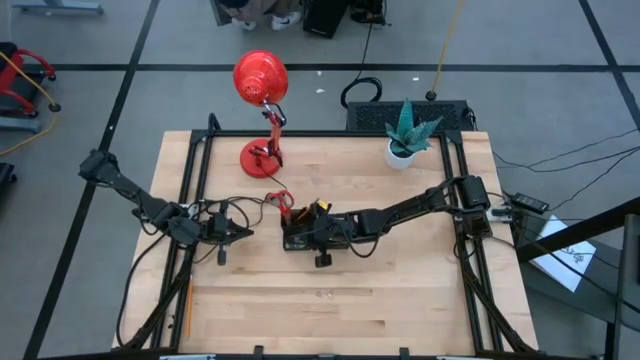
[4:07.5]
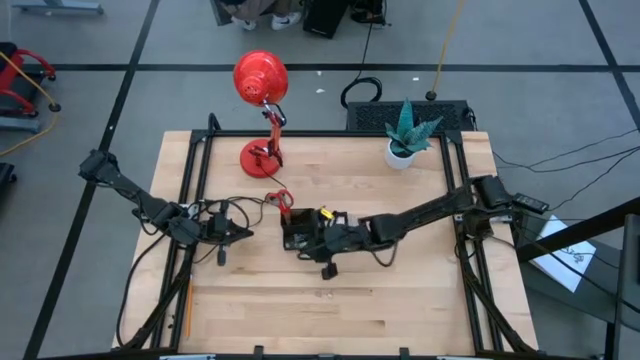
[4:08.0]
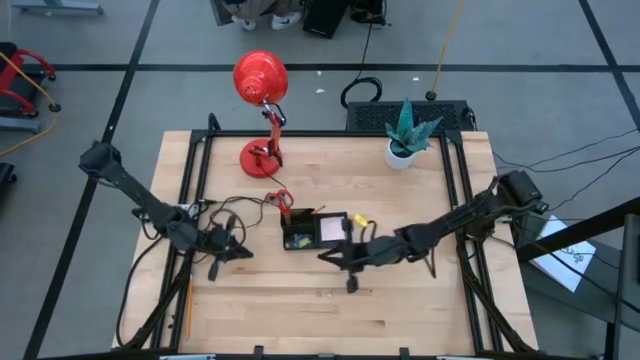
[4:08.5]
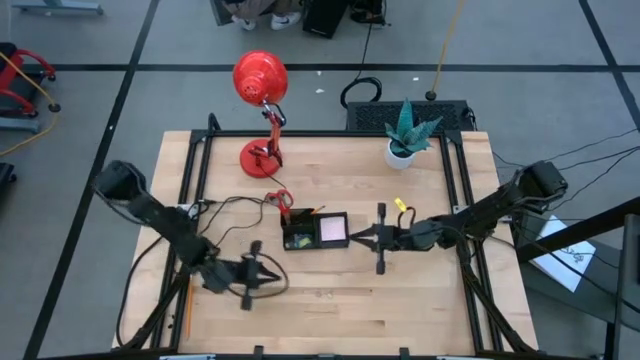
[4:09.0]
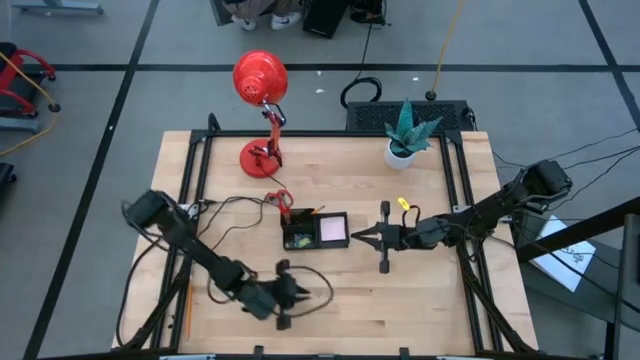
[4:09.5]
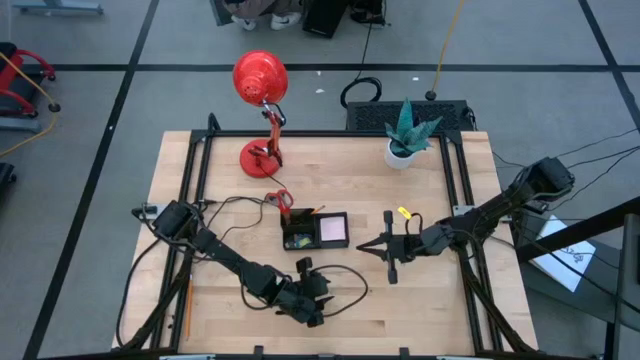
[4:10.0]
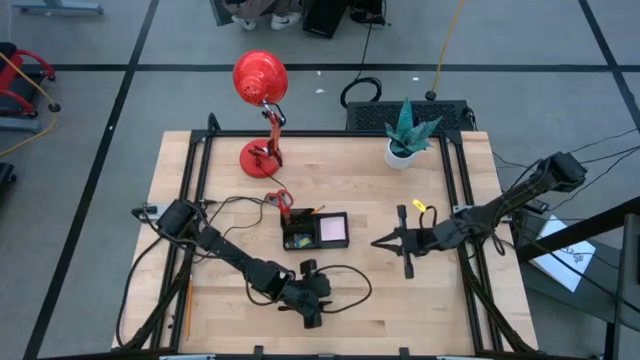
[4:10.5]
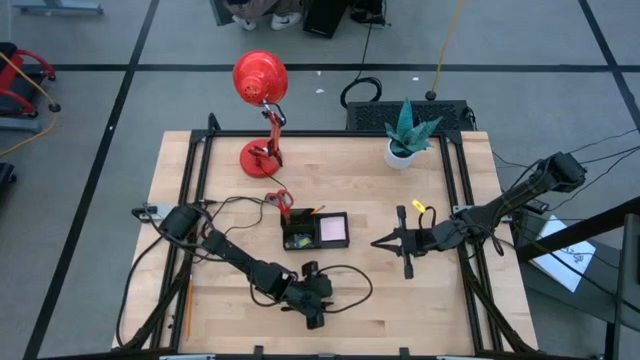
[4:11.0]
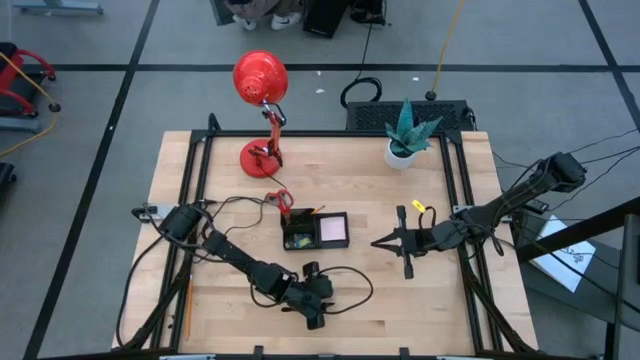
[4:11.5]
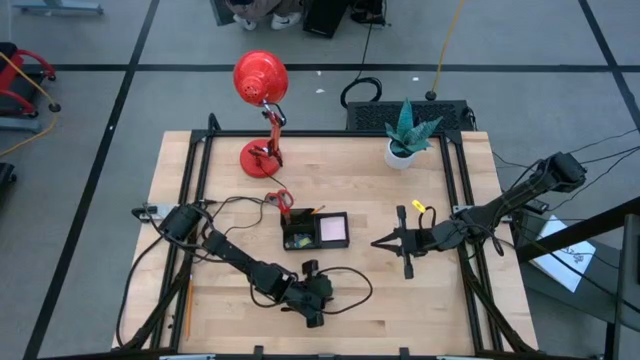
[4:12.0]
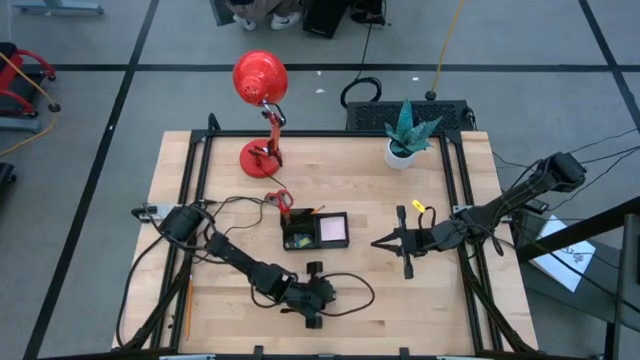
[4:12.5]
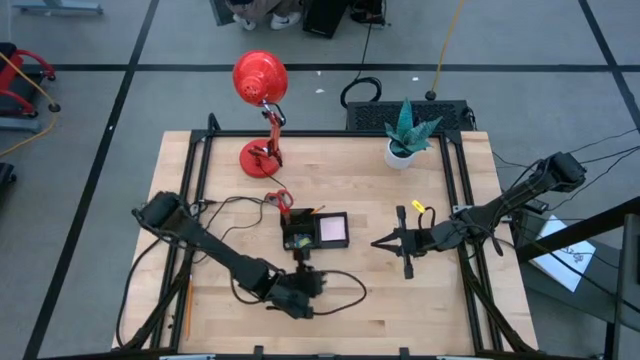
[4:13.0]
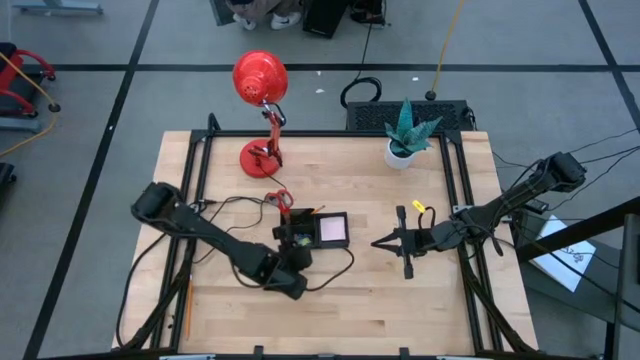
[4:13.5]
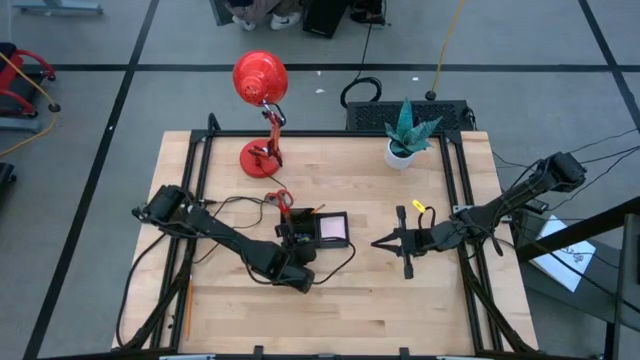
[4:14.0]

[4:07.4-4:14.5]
Task: Pick and place office supplies into organizer
Put the green binder clip into the black desk organizer

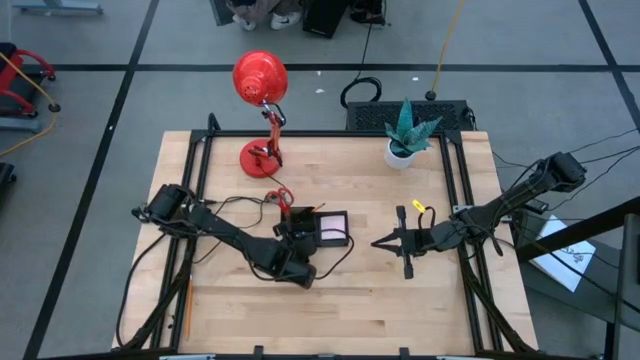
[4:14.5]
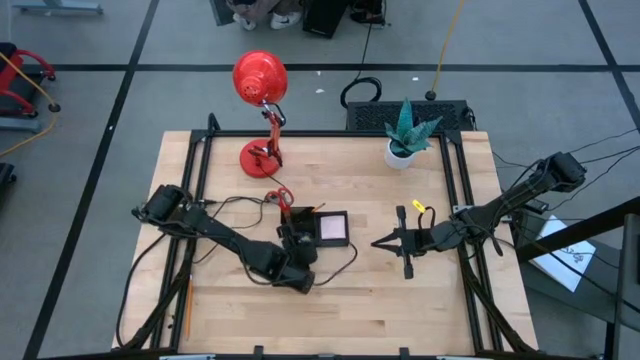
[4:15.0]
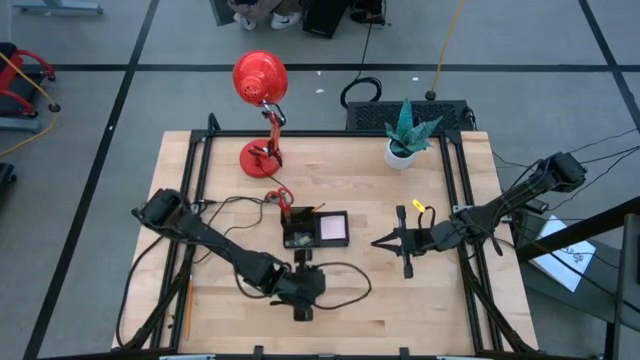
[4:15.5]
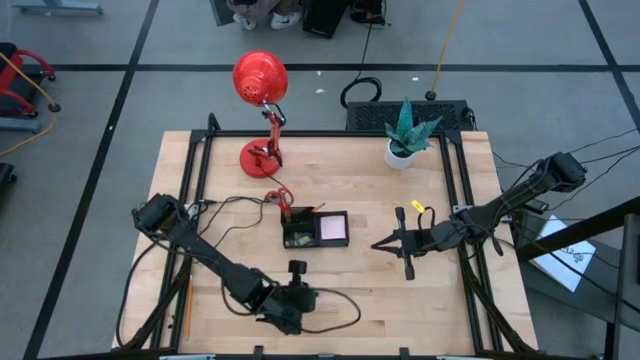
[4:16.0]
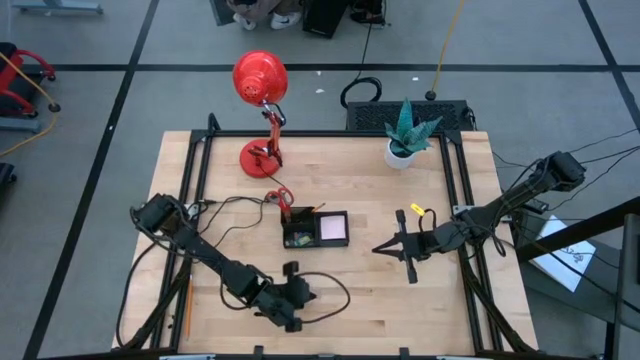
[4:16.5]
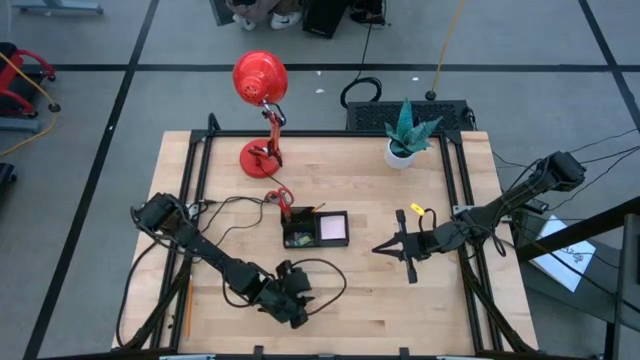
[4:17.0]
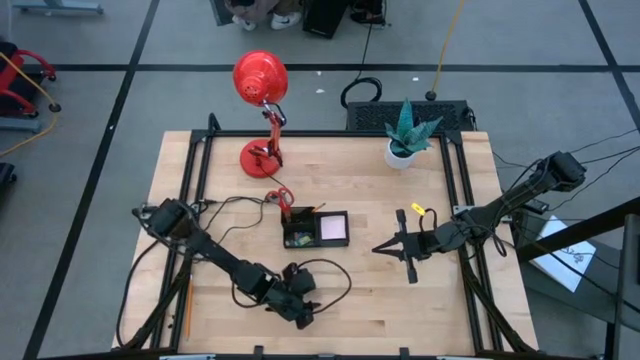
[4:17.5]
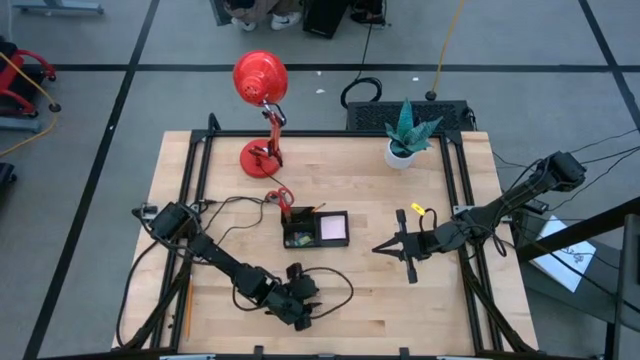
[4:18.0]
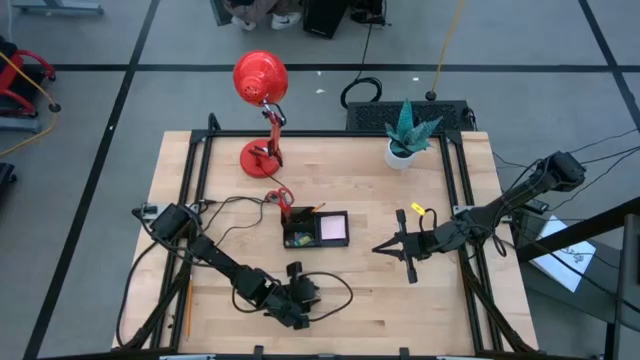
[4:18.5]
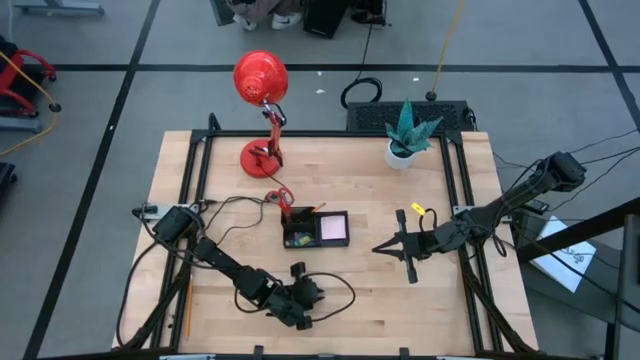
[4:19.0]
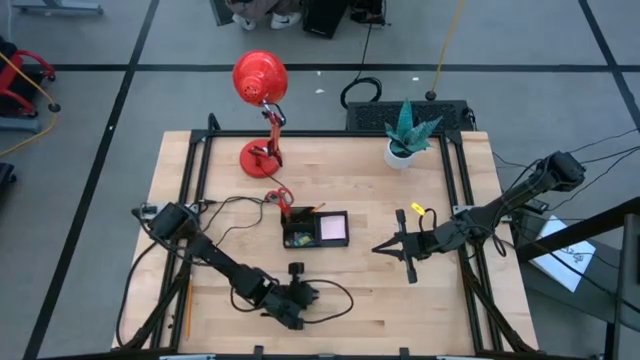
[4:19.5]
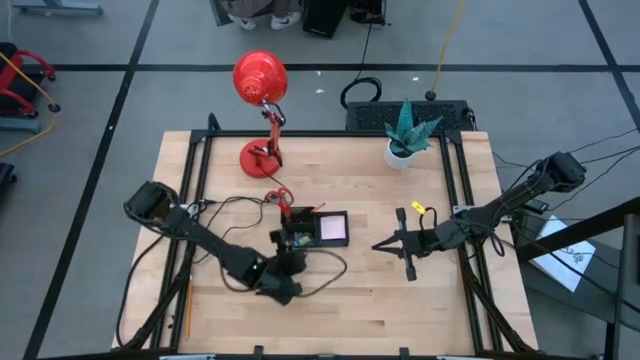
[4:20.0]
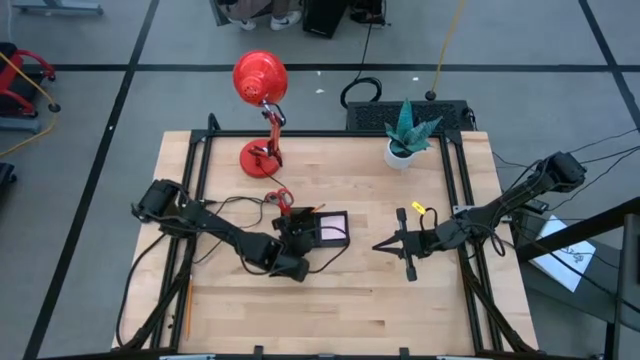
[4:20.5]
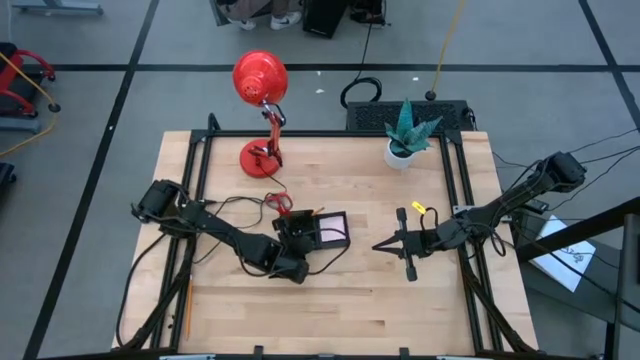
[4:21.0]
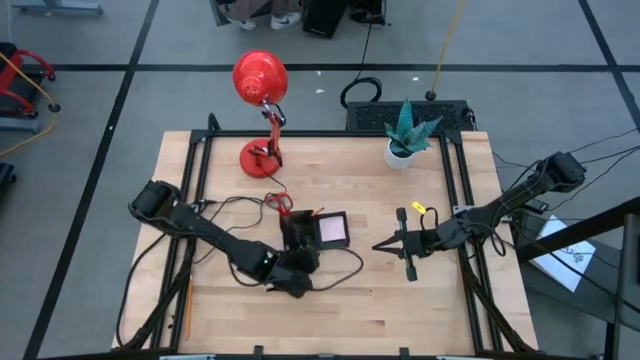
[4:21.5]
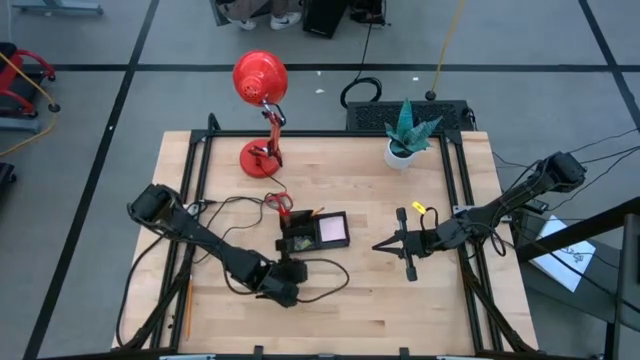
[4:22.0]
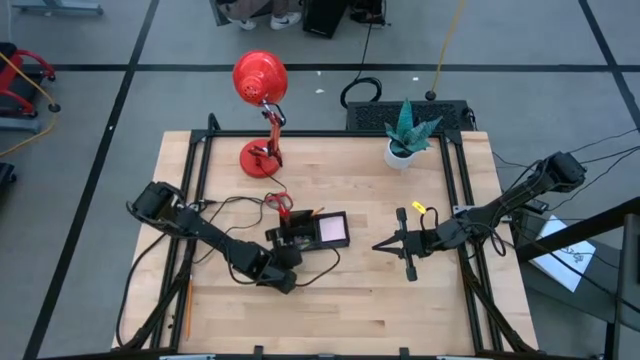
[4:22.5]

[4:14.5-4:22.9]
Put the pink binder clip into the black desk organizer

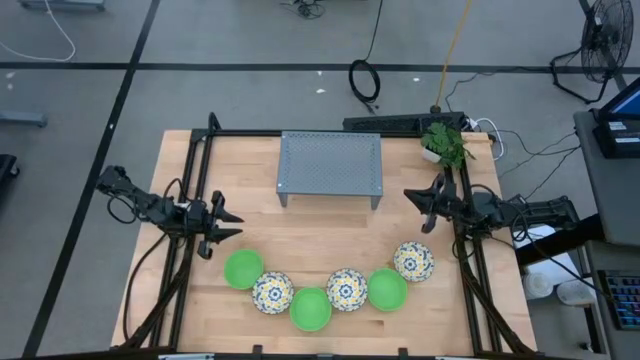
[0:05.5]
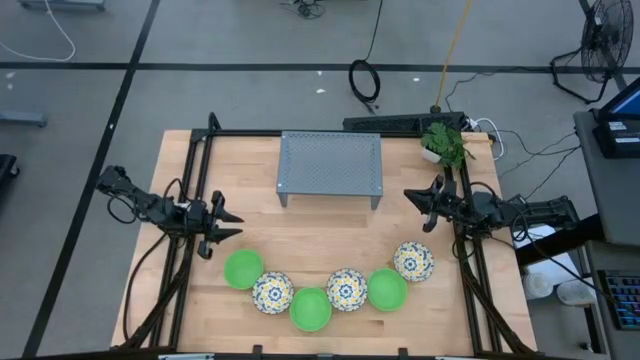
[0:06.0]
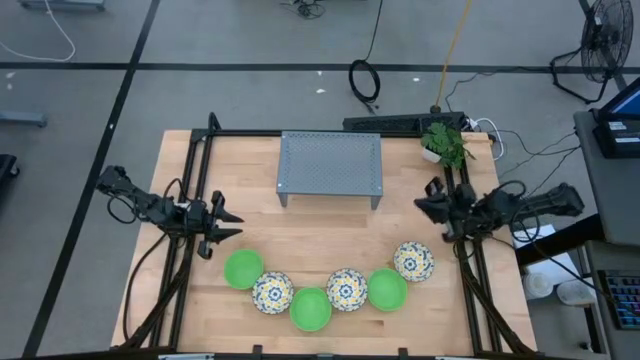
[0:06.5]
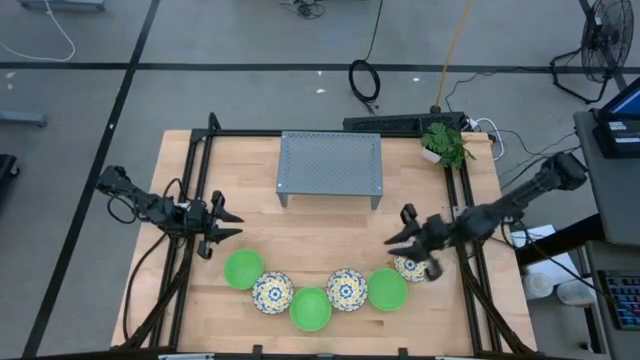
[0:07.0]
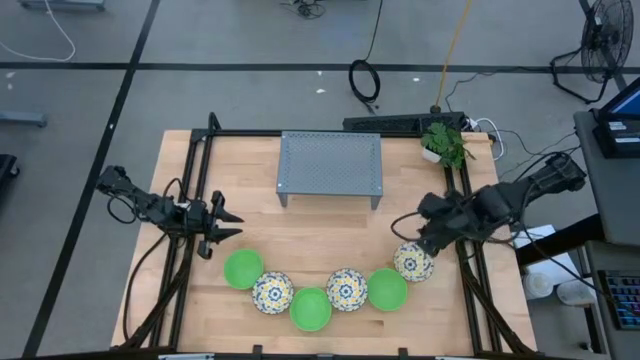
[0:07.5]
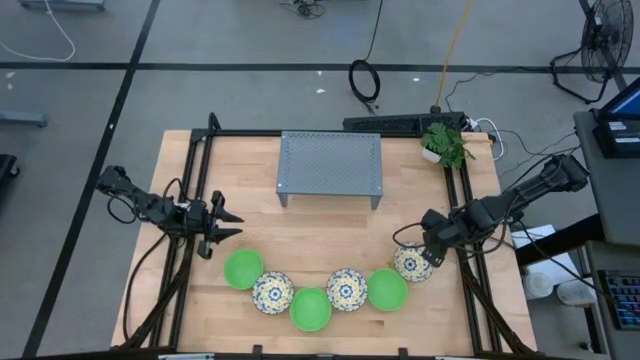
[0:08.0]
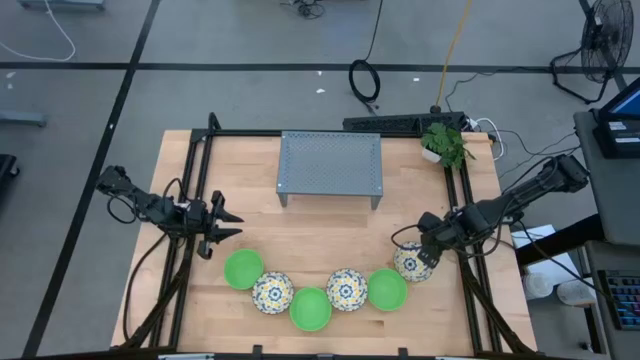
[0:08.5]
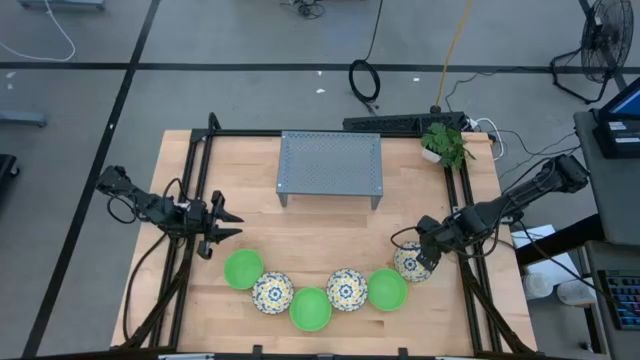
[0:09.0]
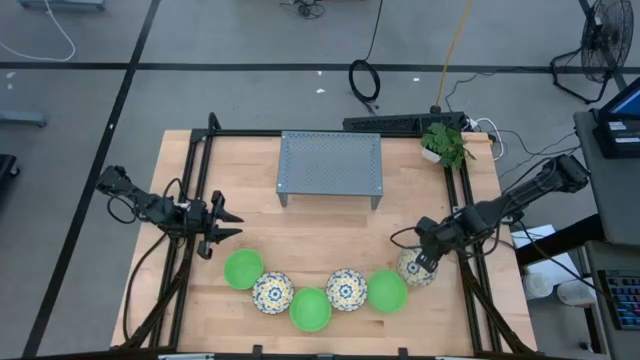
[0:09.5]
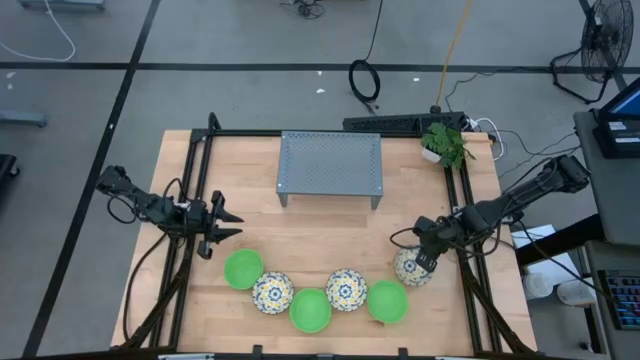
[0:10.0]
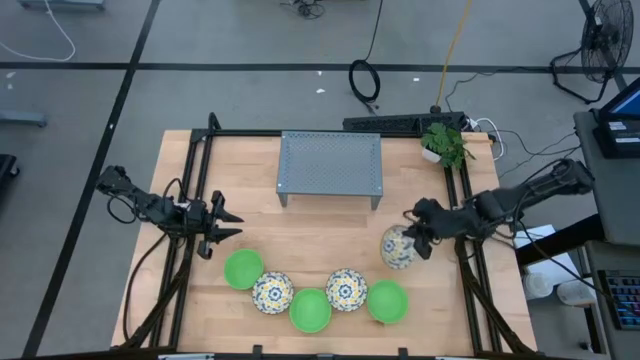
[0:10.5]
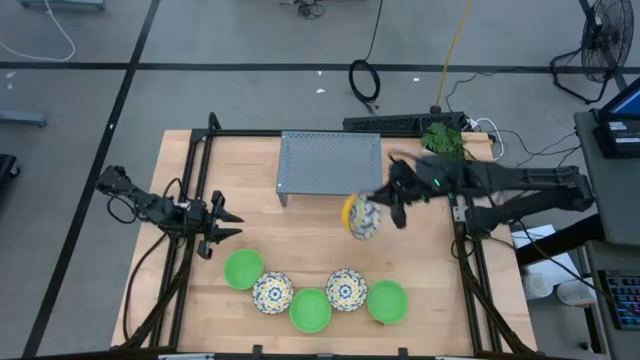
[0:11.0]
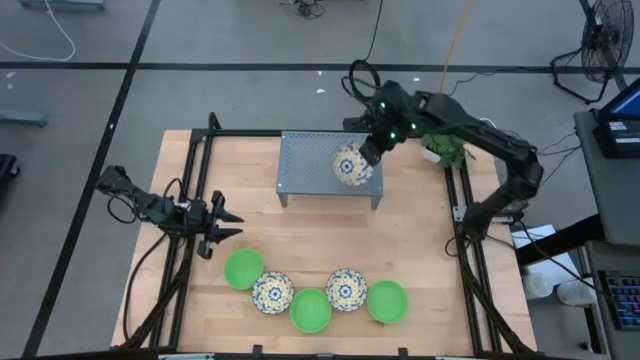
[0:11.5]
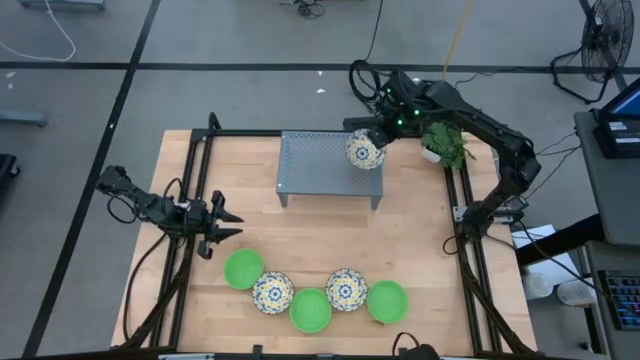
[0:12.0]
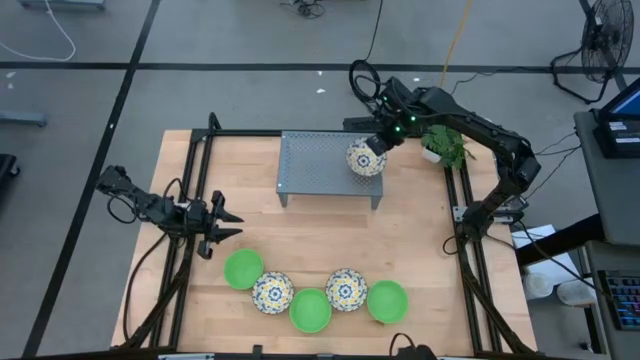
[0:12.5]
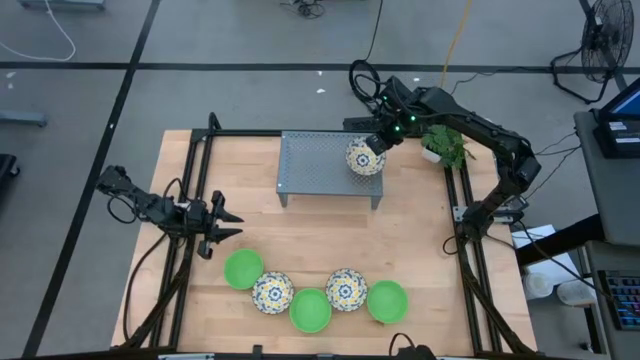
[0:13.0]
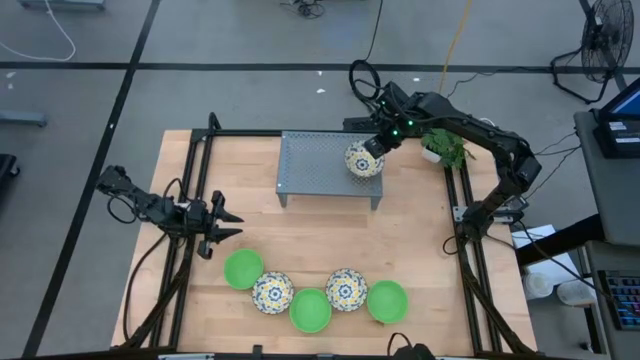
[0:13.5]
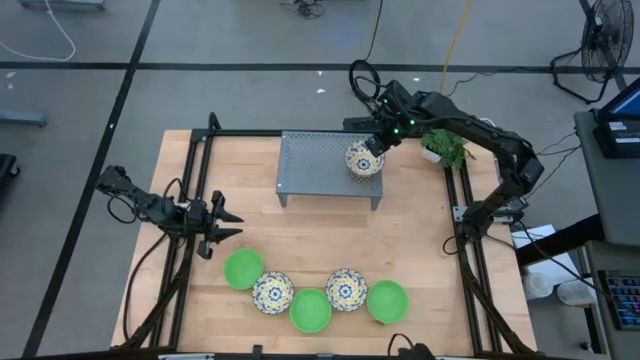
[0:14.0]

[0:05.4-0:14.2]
Task: Pick & Place Mini bowls
Put the right white patterned bowl on the shelf
